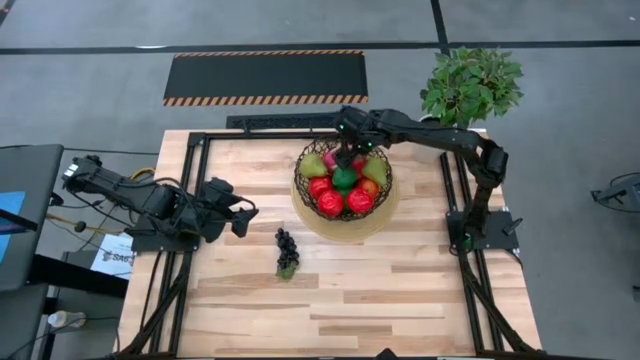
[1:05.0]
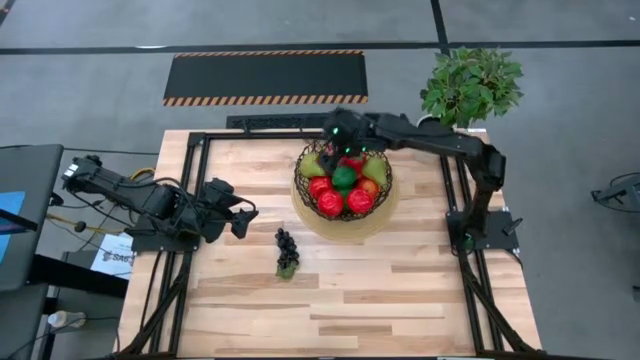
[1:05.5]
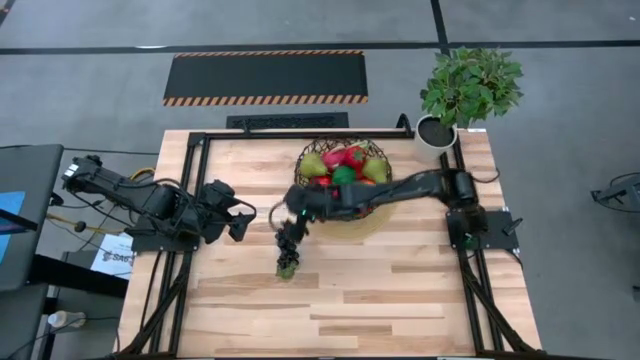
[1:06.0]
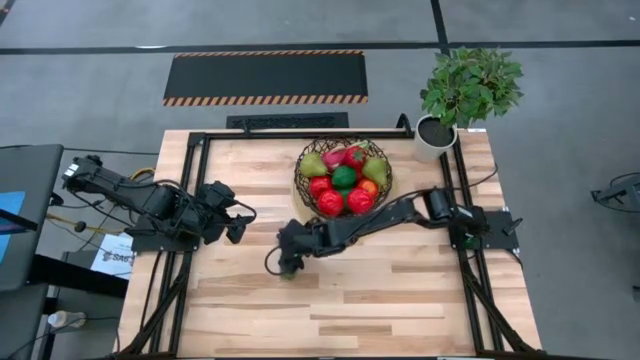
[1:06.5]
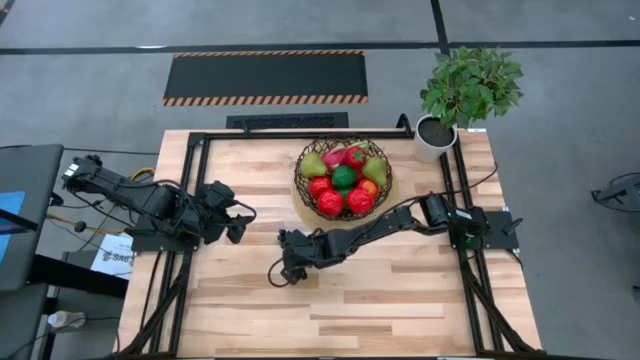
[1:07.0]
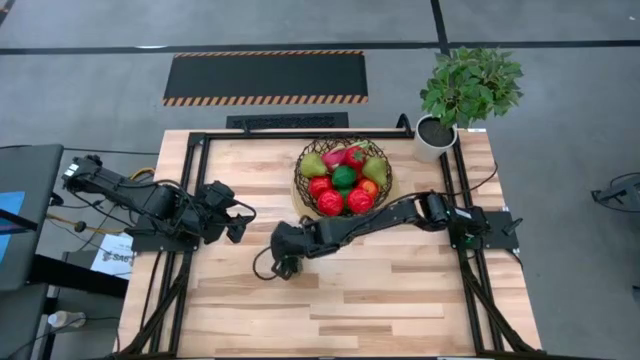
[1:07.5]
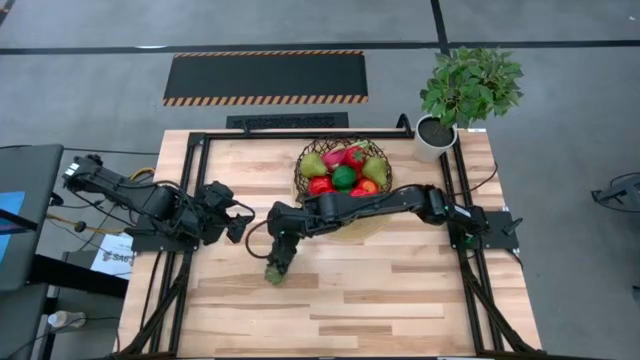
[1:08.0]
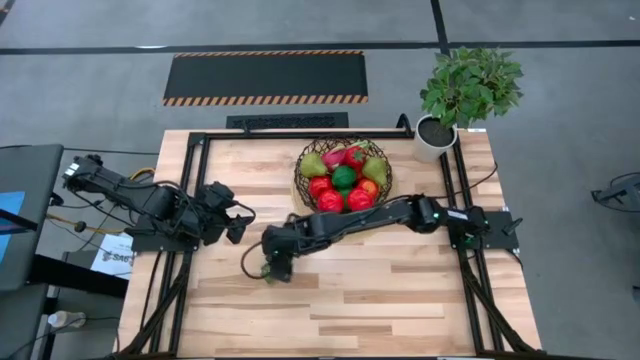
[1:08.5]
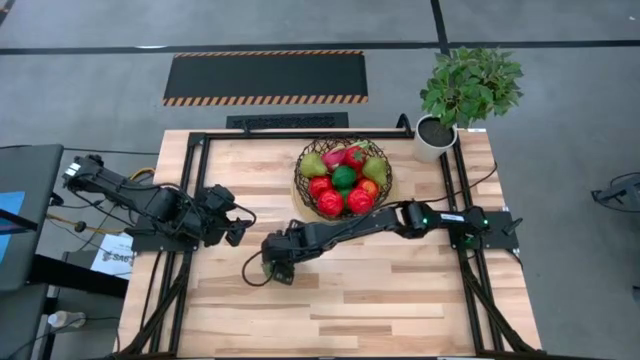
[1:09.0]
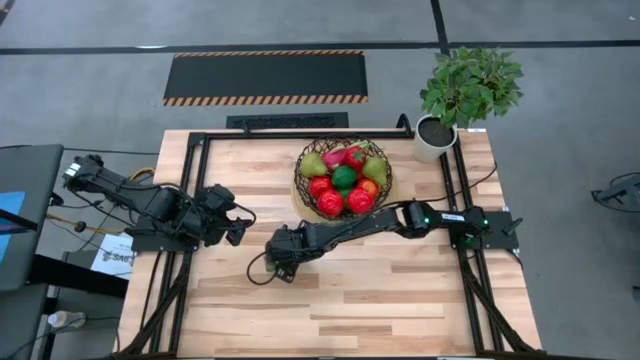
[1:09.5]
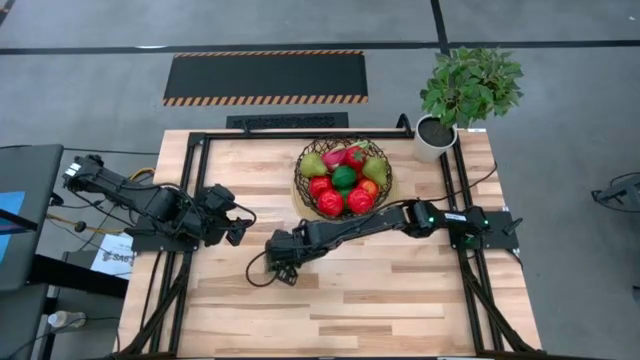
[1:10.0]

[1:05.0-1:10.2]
Task: Build produce basket
Put the purple grapes into the black wire basket

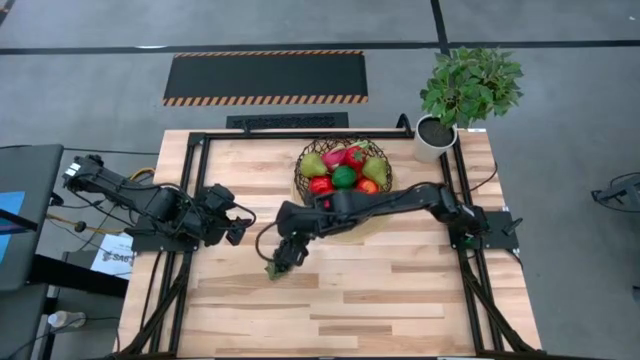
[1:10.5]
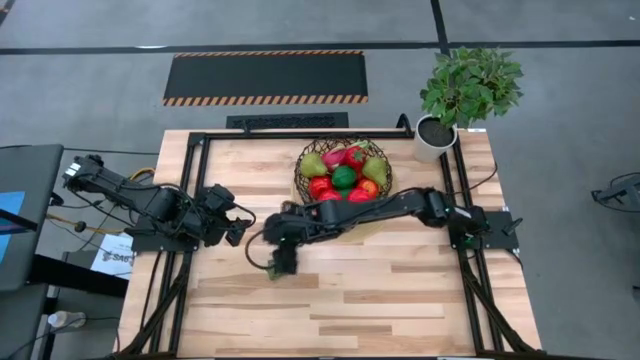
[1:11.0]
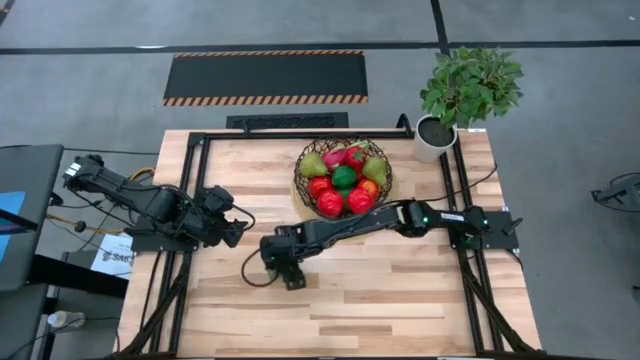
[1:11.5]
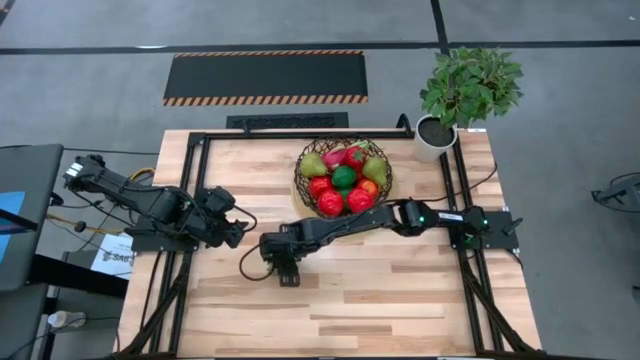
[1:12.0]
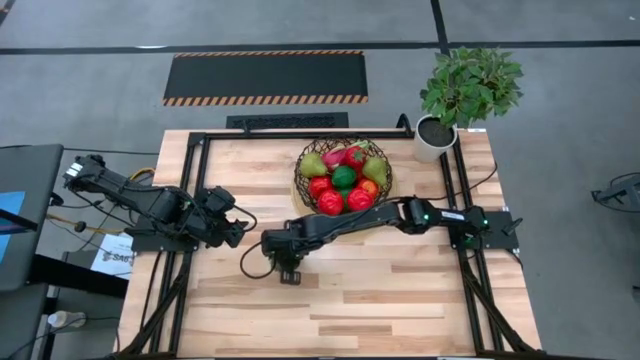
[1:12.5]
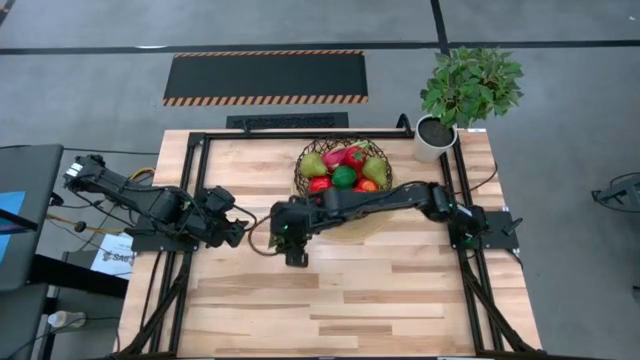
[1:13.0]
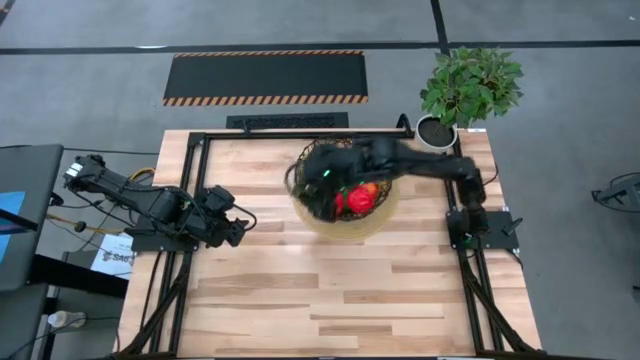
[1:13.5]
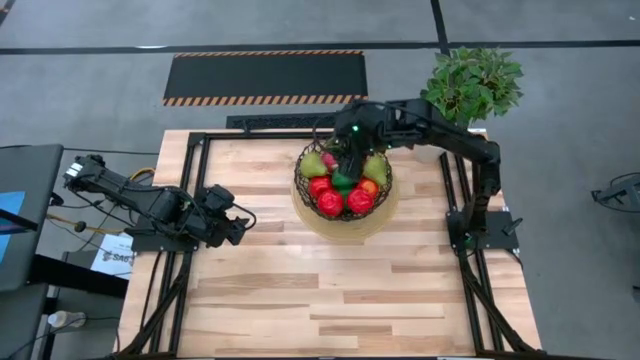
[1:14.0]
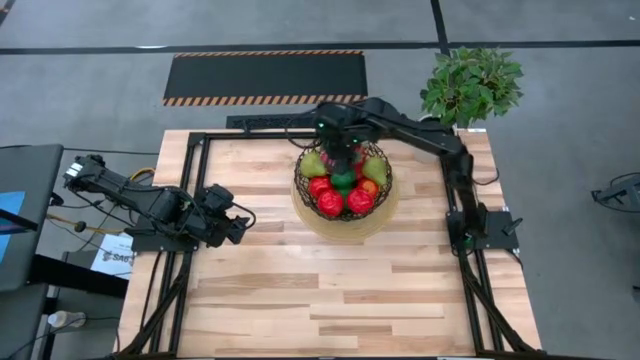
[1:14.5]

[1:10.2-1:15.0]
Put the purple grapes into the black wire basket

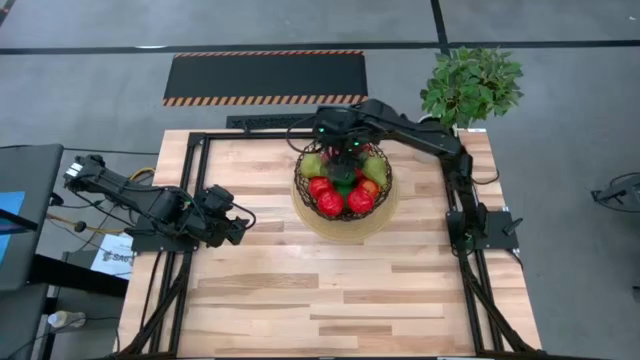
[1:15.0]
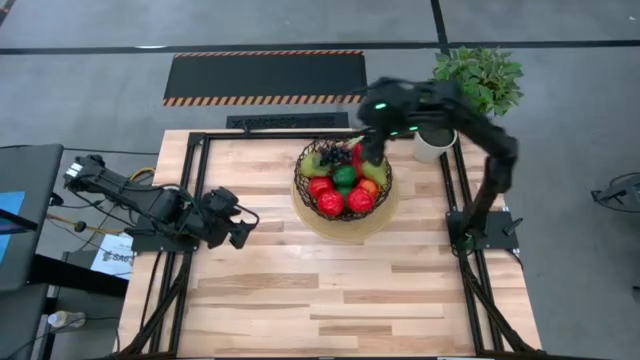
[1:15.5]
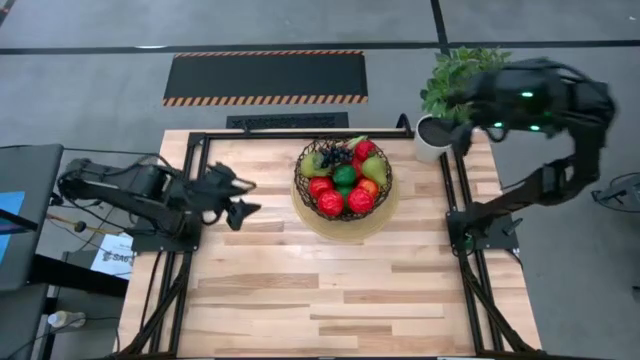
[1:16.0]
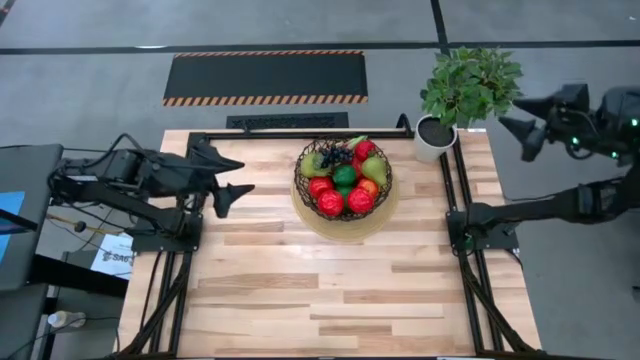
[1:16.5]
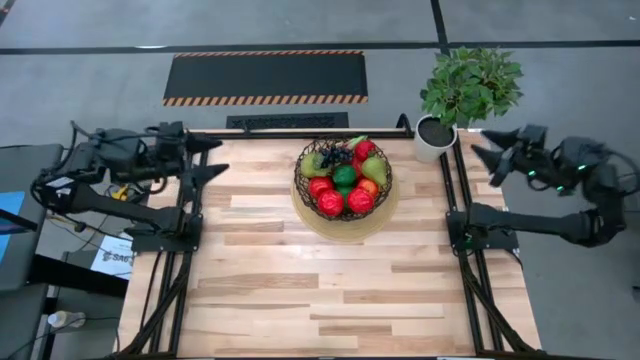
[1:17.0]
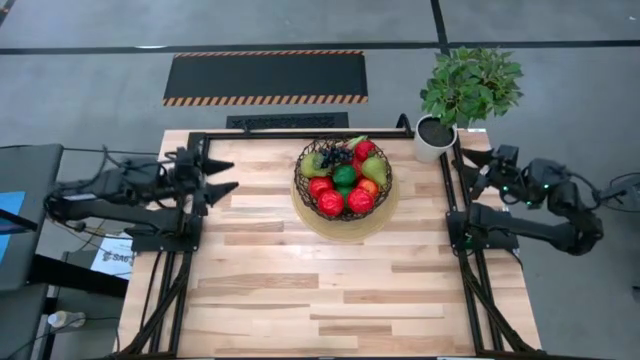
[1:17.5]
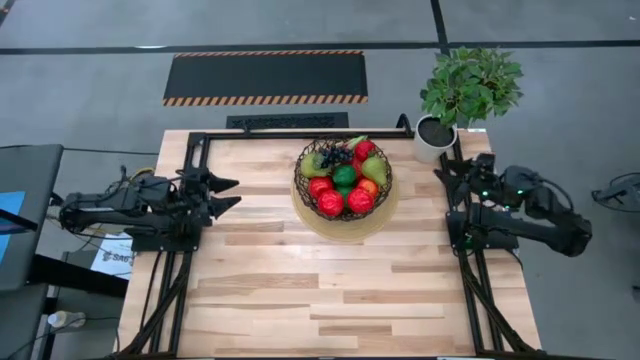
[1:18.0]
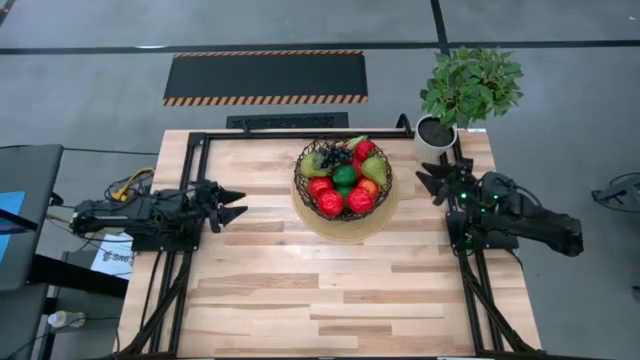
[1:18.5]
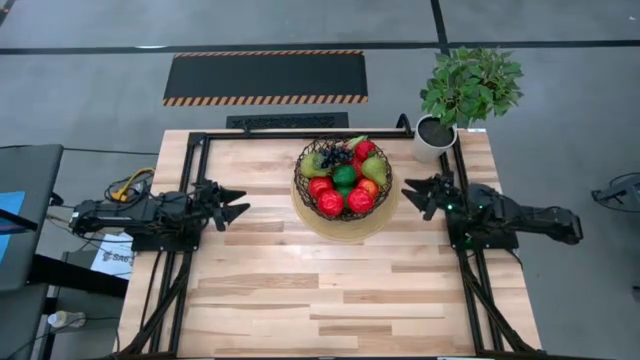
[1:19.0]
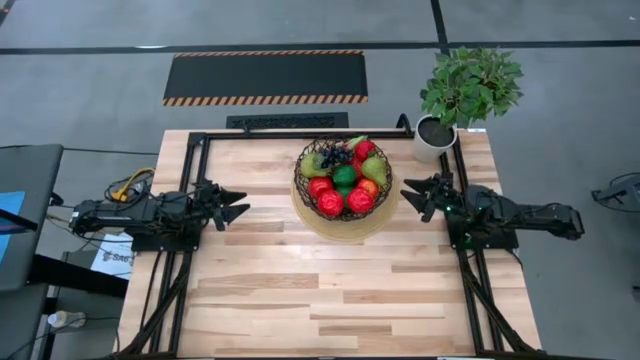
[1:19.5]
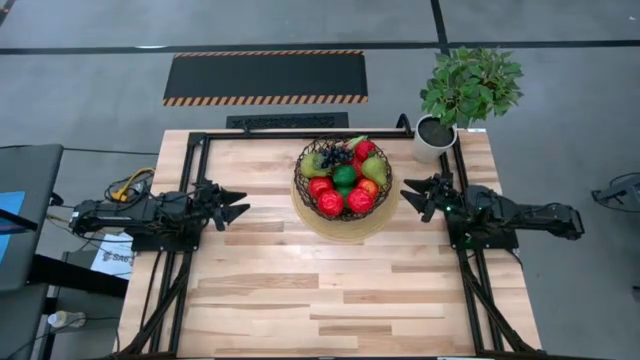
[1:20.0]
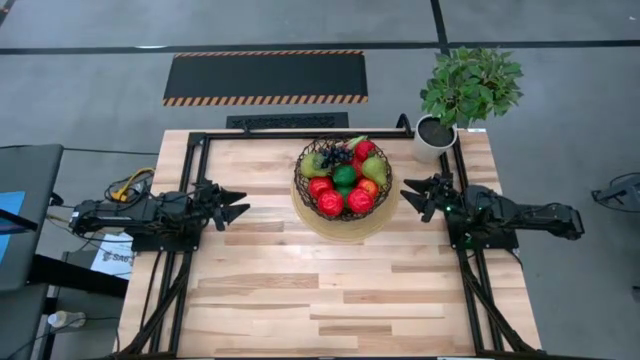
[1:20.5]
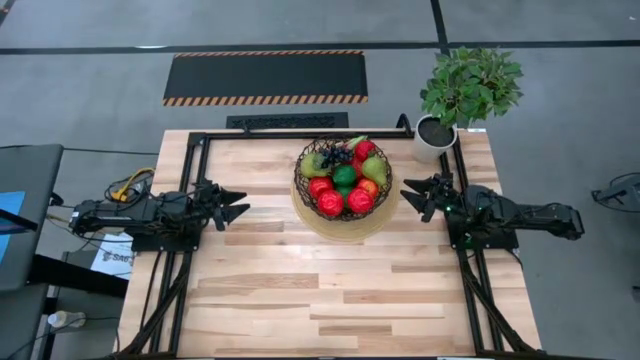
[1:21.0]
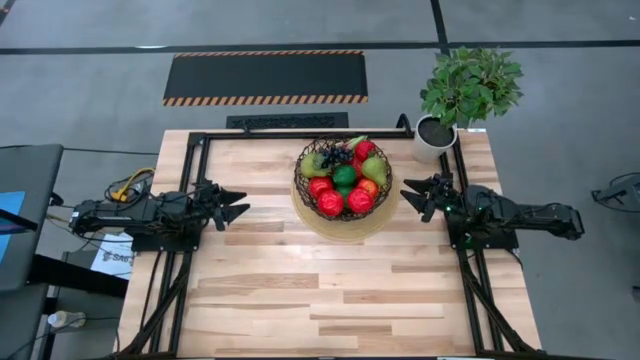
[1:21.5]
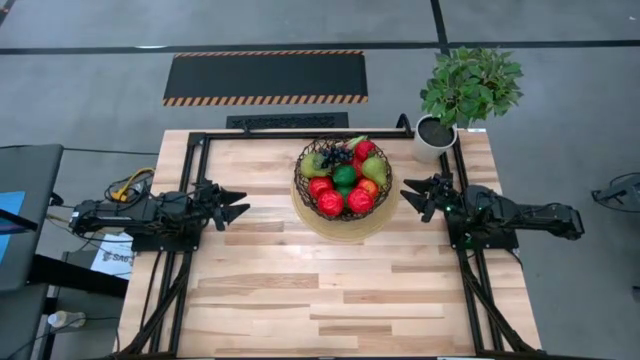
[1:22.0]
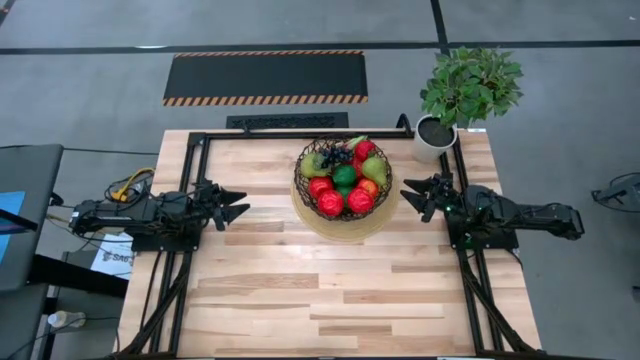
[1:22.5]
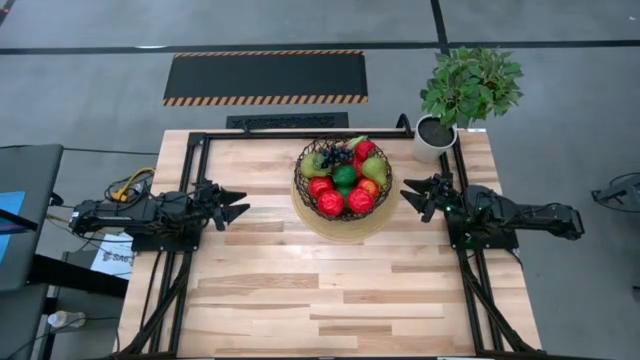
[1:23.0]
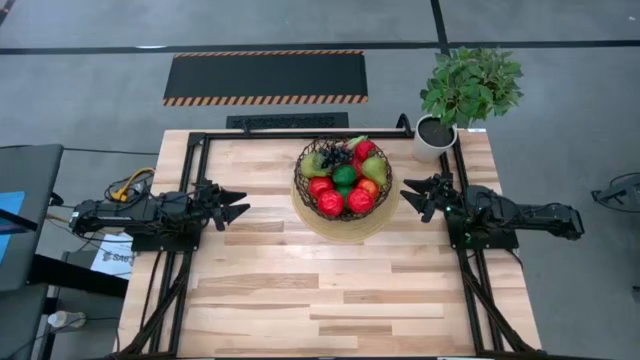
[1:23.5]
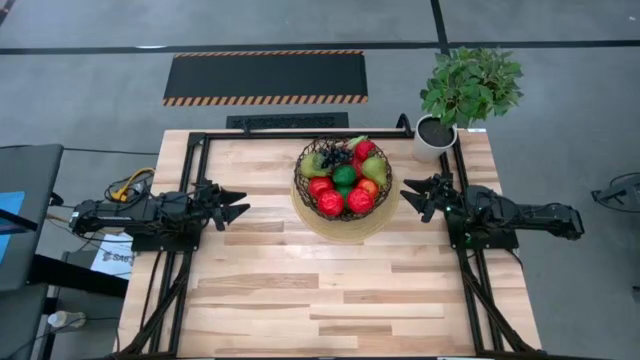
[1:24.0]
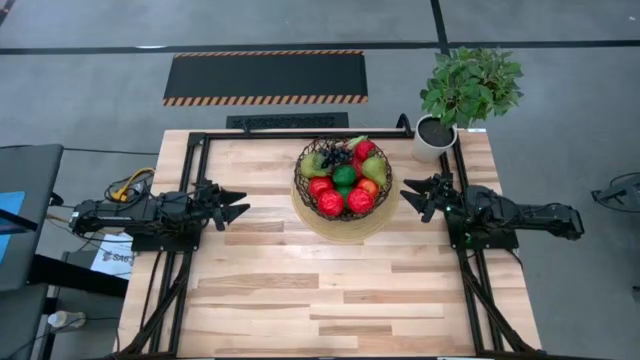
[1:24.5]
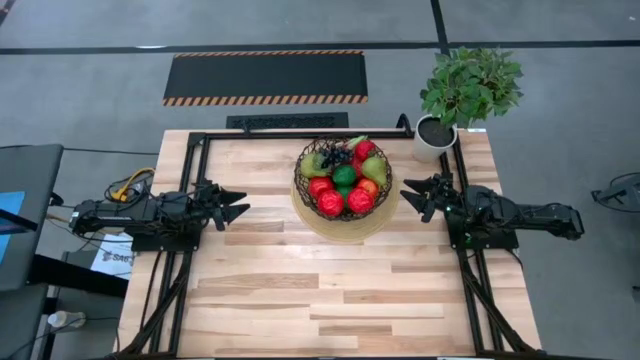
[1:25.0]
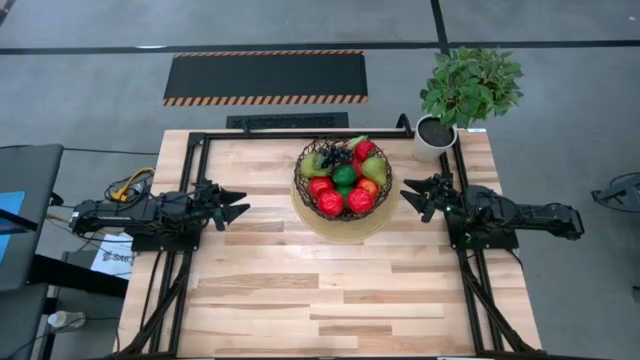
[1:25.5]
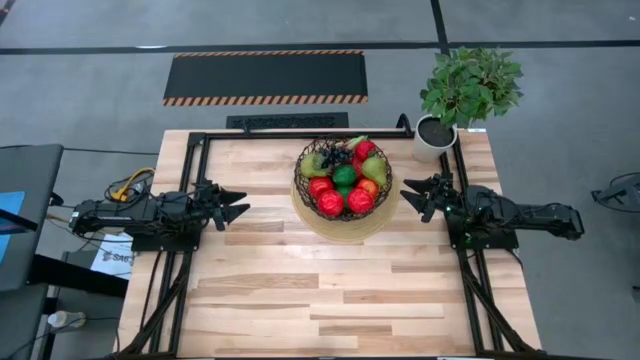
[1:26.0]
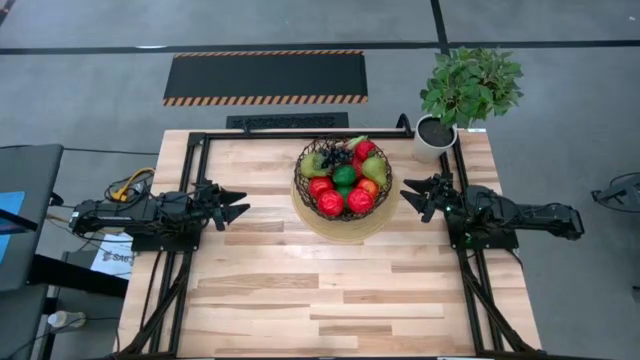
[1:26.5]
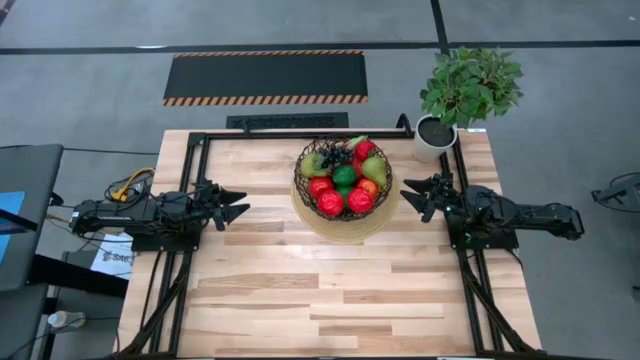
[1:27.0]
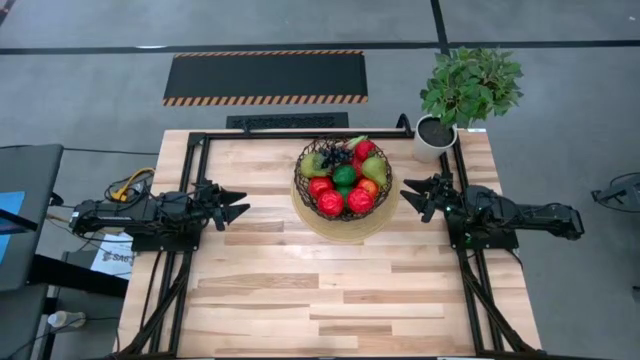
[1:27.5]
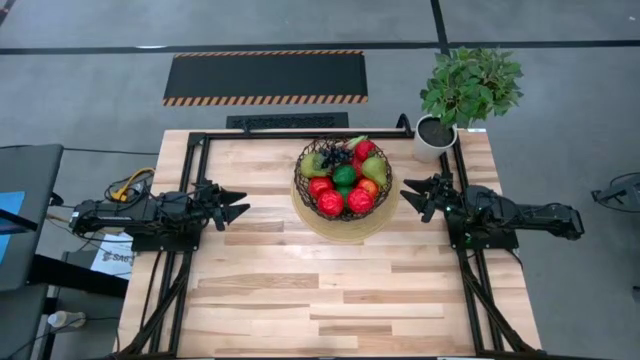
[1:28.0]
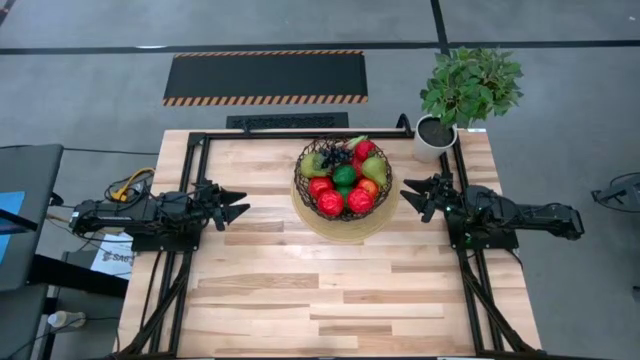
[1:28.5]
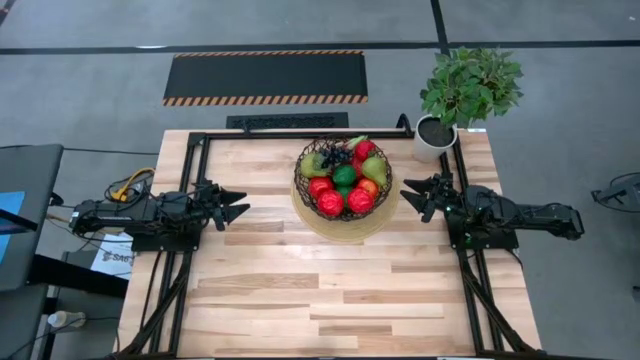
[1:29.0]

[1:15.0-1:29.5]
Return to Home Position
